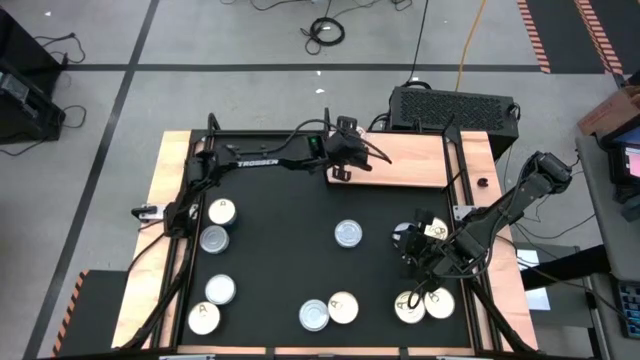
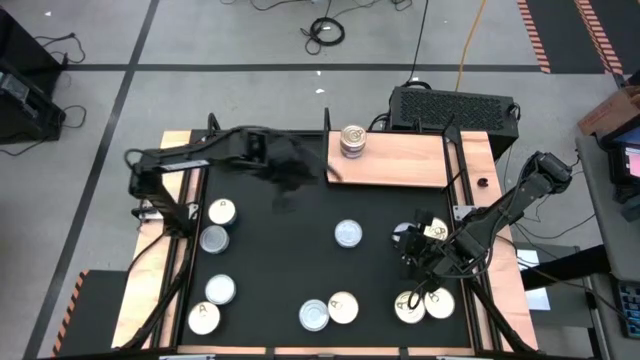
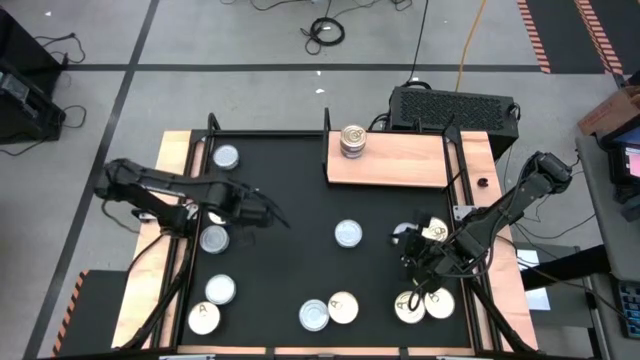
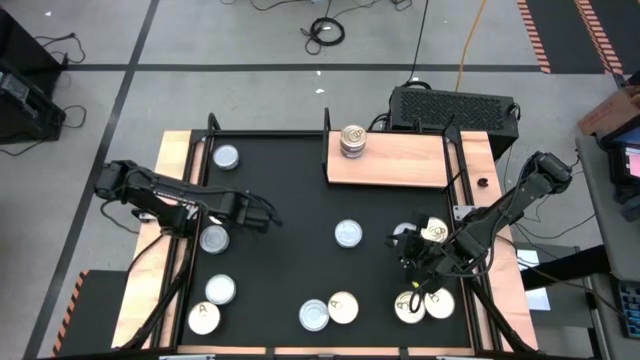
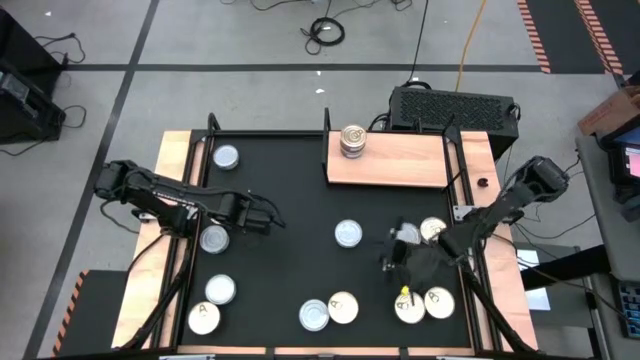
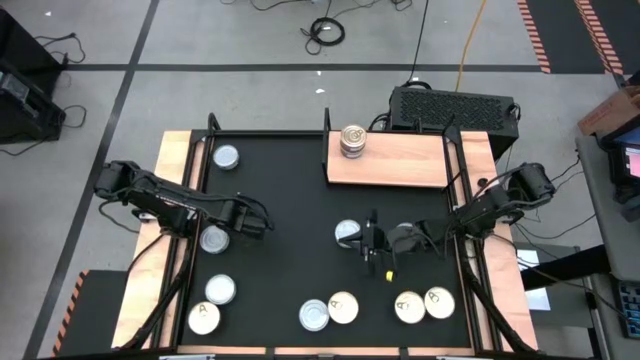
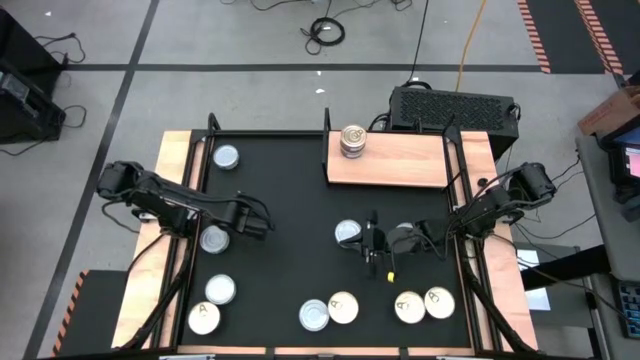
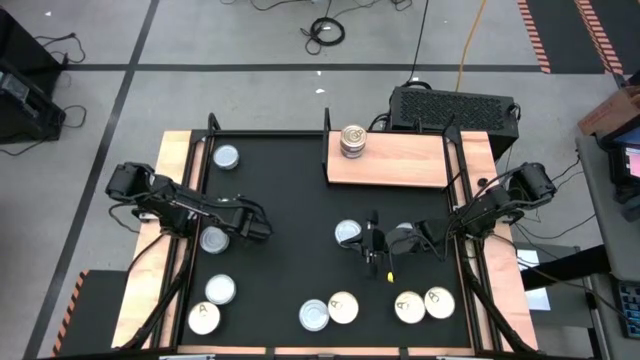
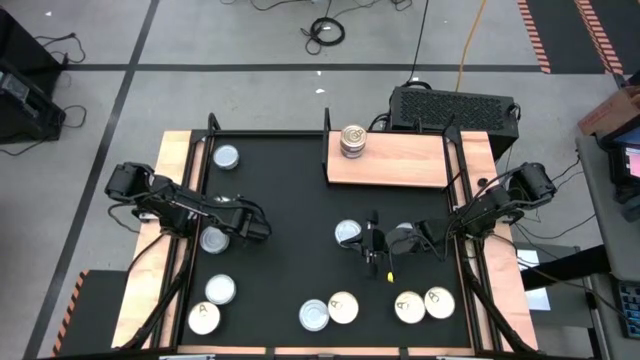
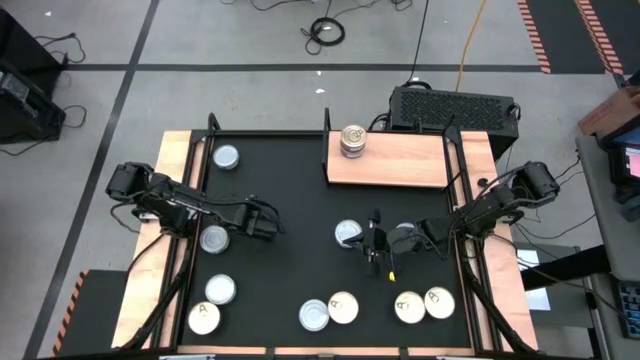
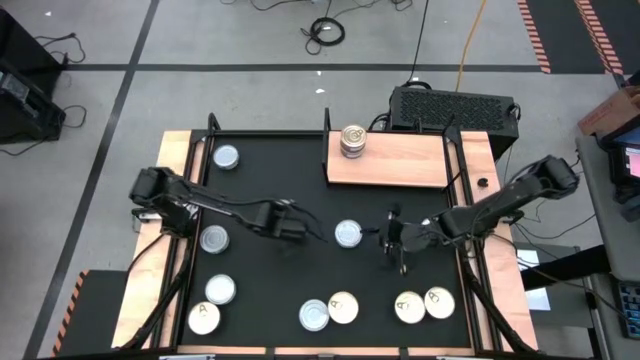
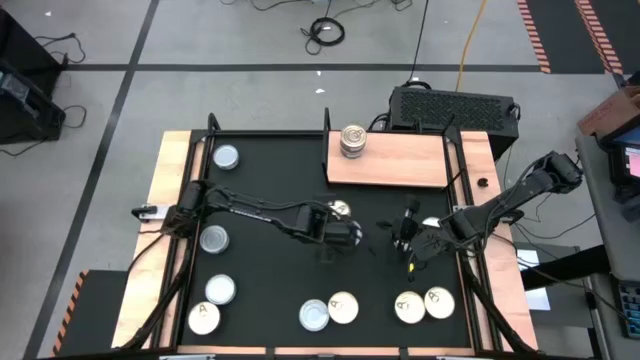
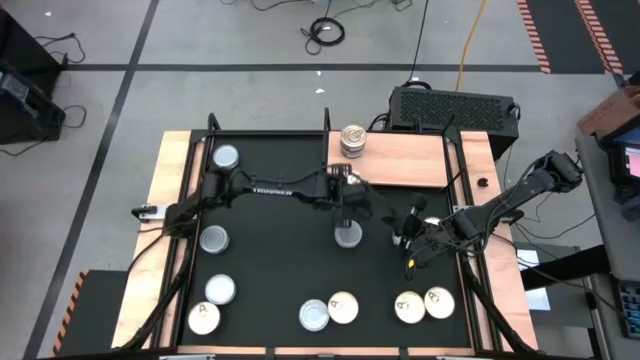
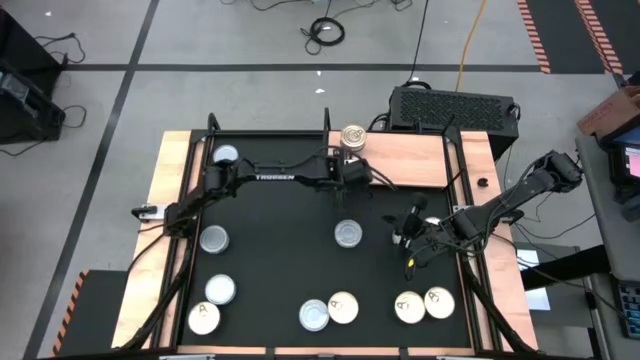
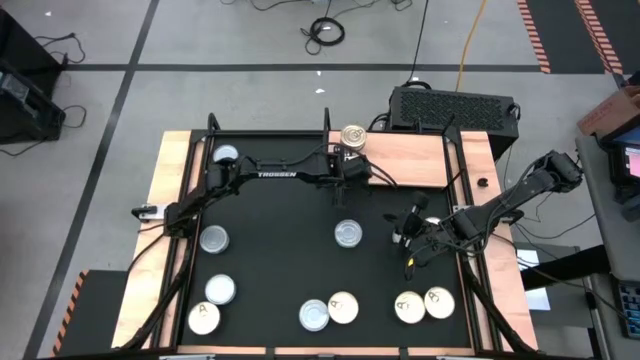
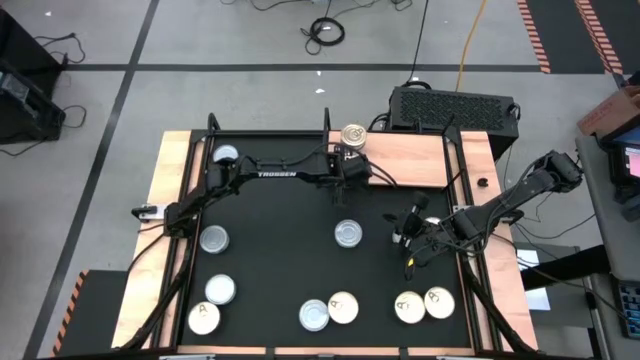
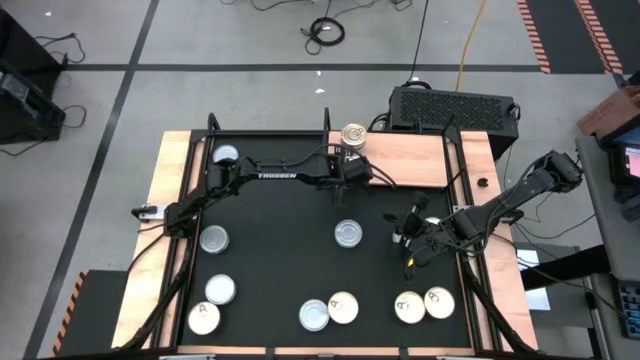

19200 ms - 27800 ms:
Task: Stack canned seafood by type on shelf
Put the blue-pink tuna can aligned with the other blue-pink tuna can on the shelf

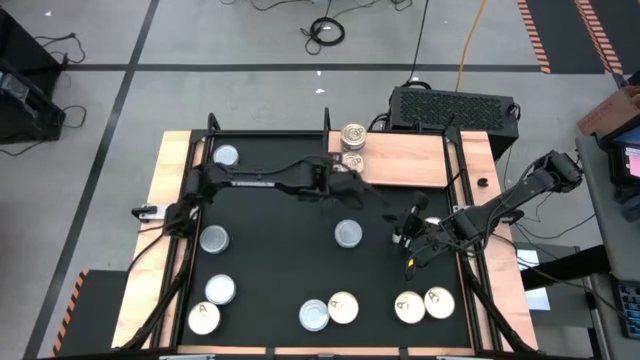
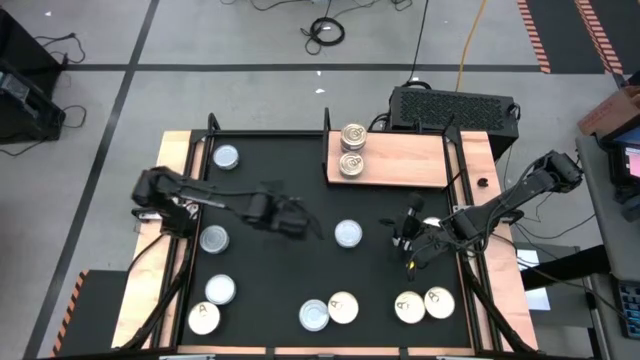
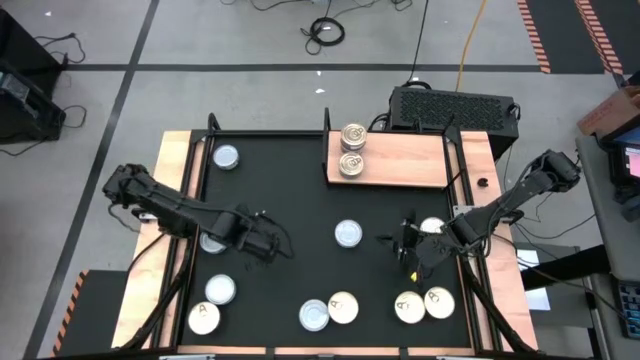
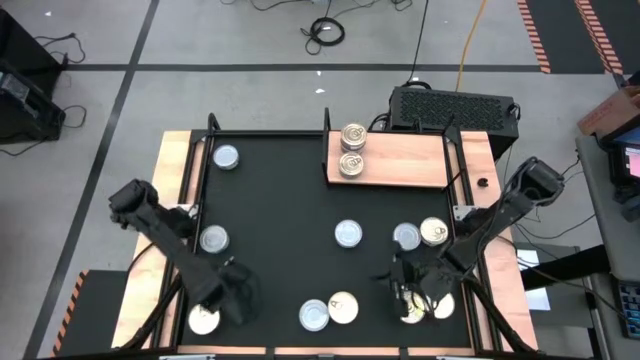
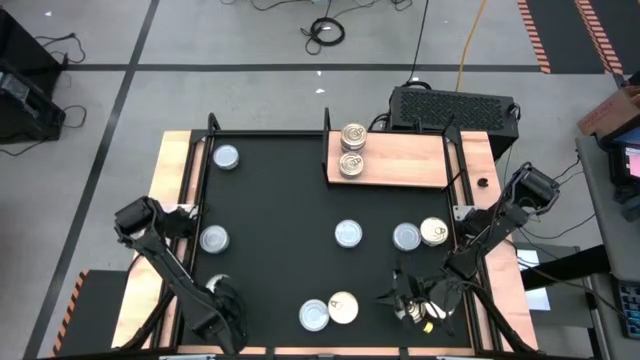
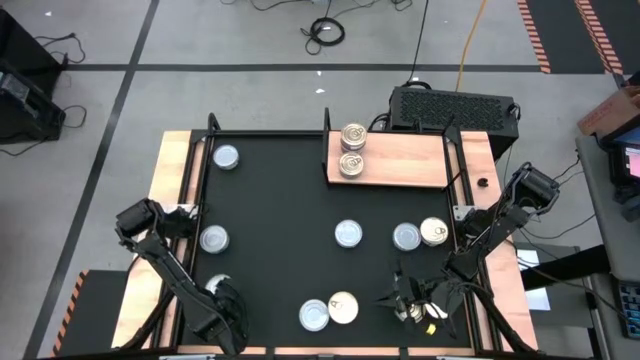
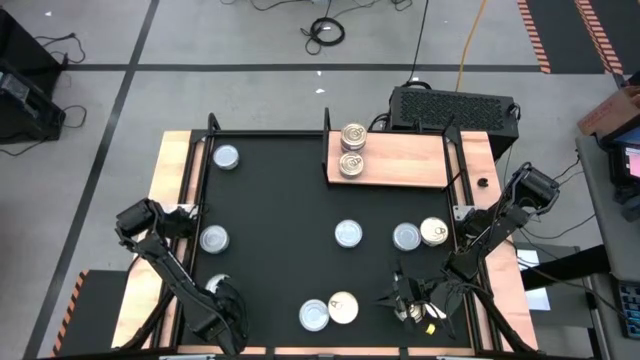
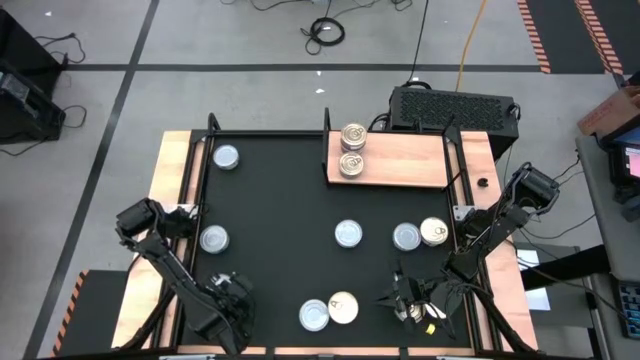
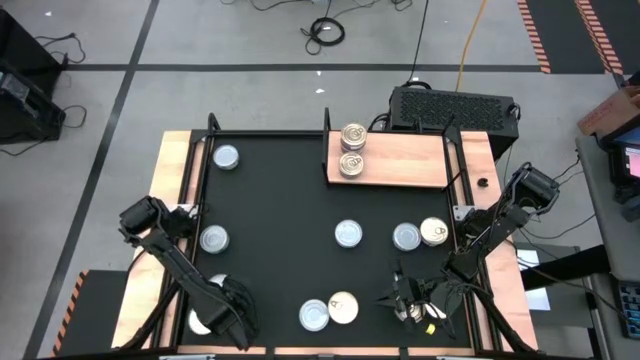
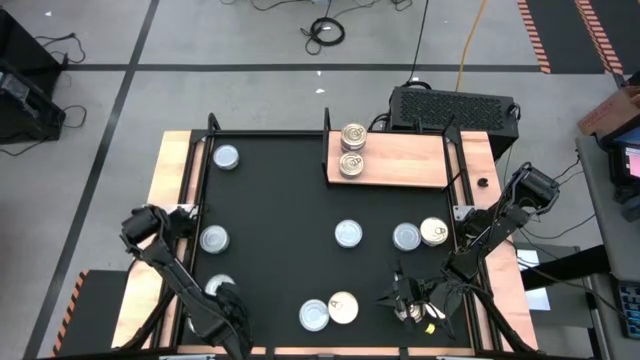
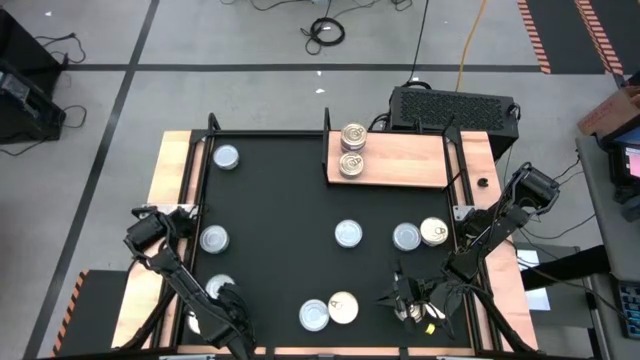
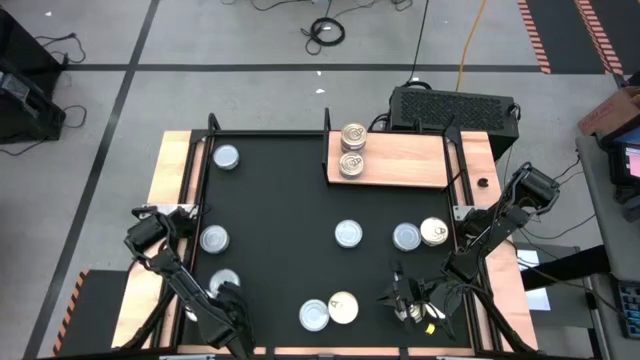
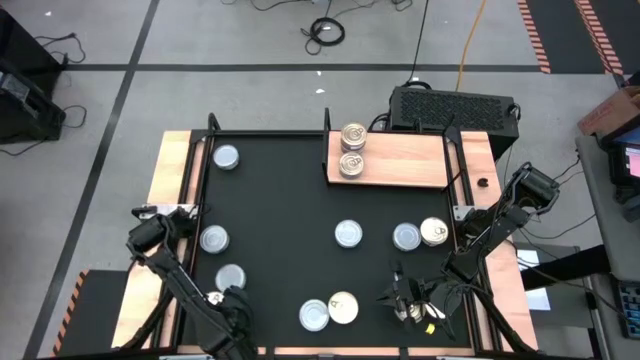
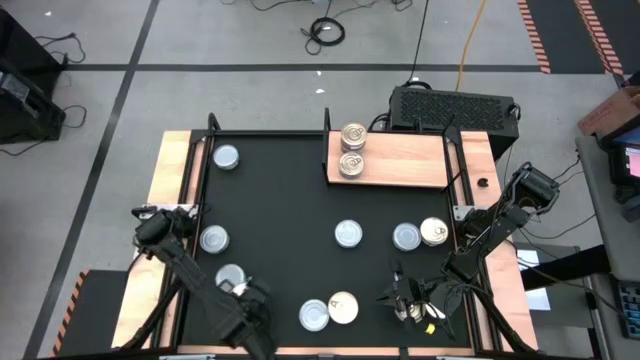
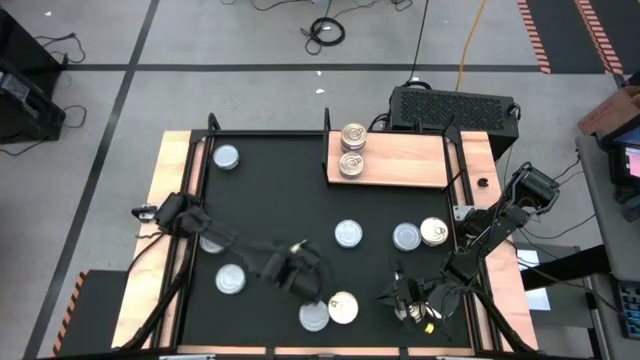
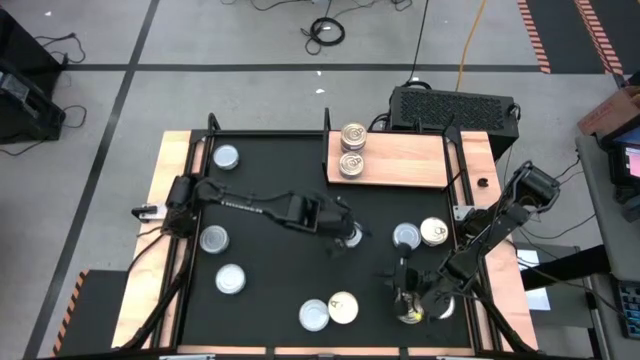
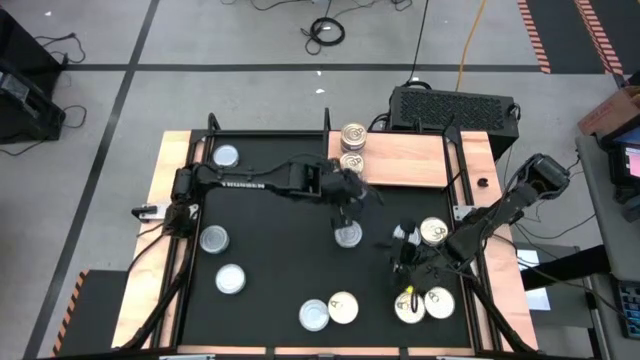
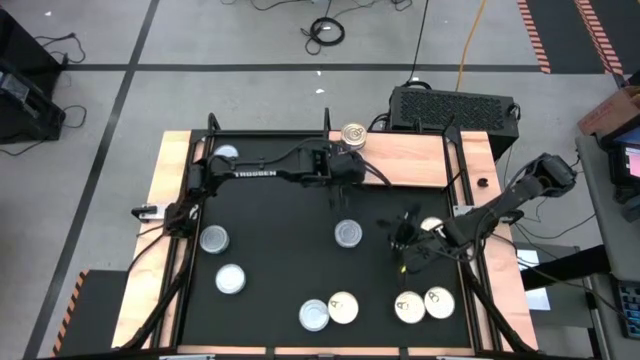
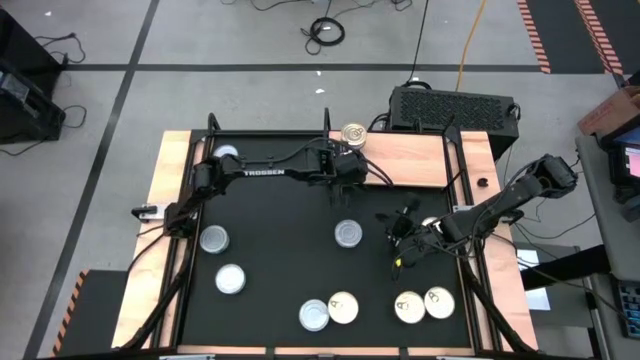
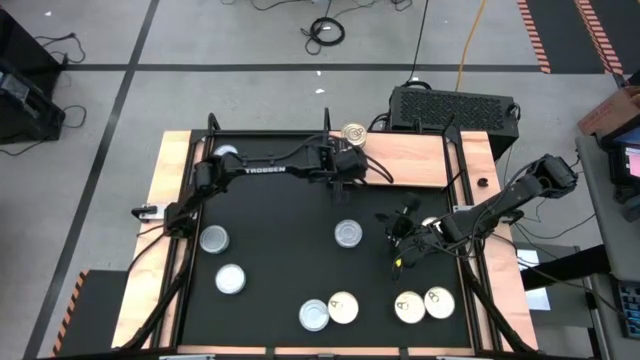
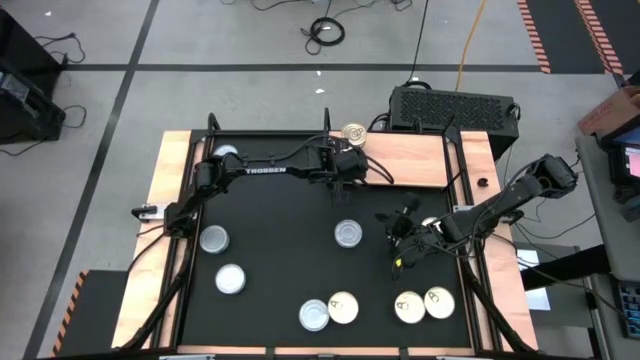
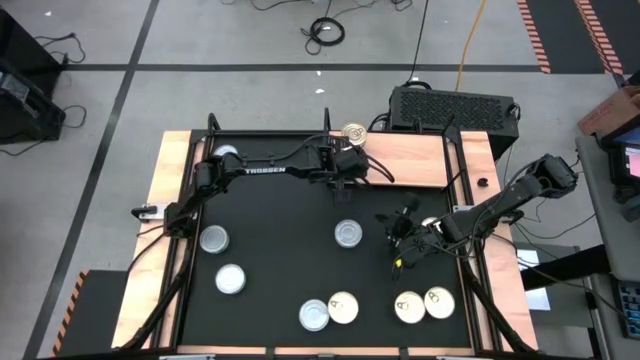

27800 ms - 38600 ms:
Stack the blue-pink tuna can on top of the bottom blue-pink tuna can on the shelf

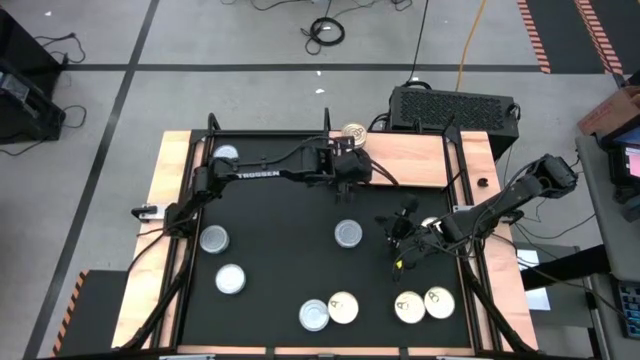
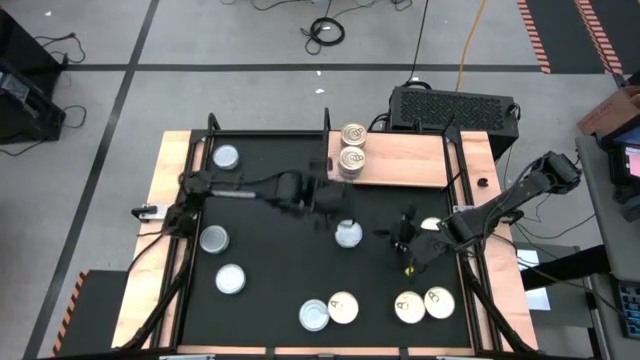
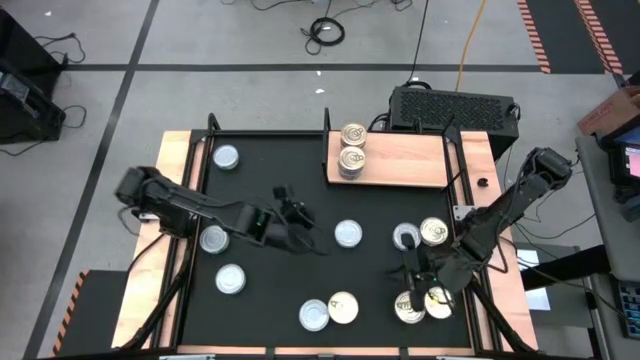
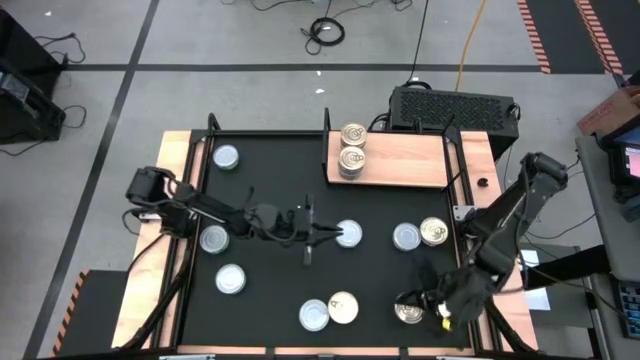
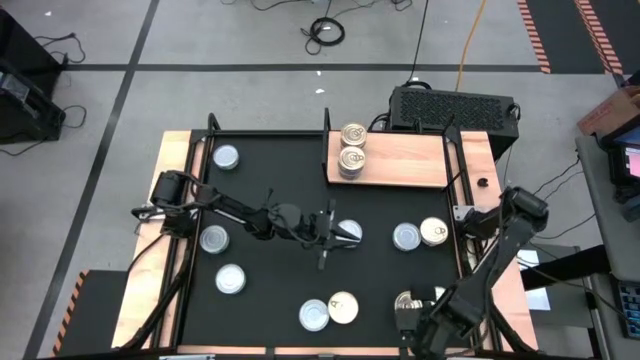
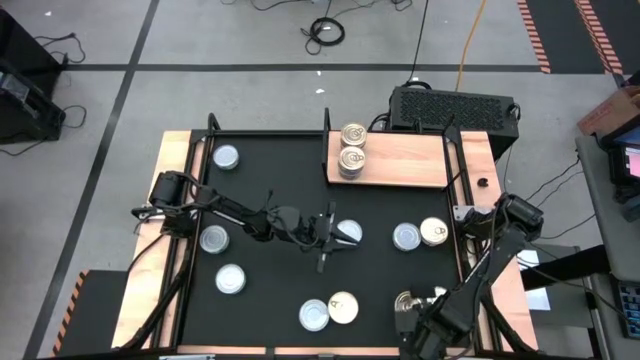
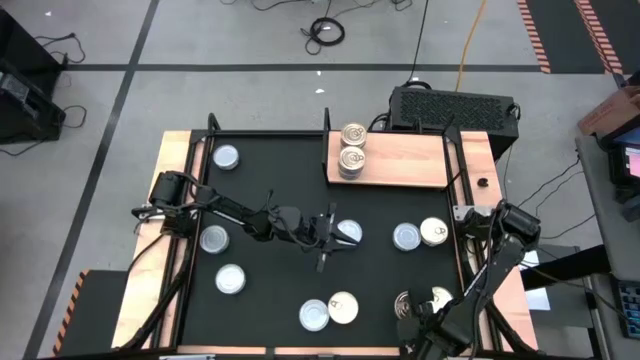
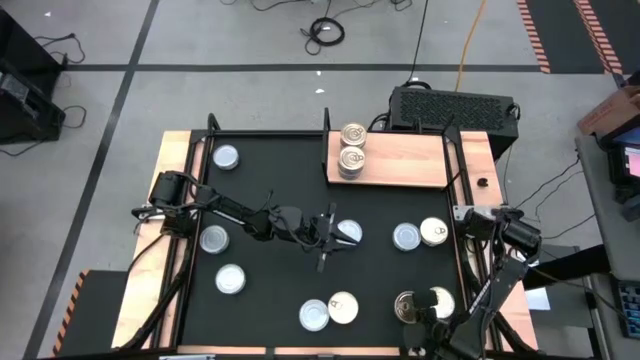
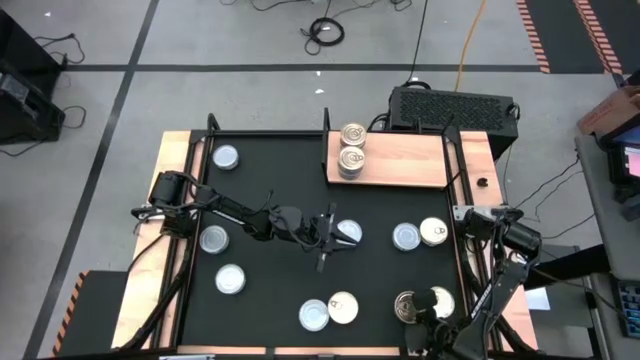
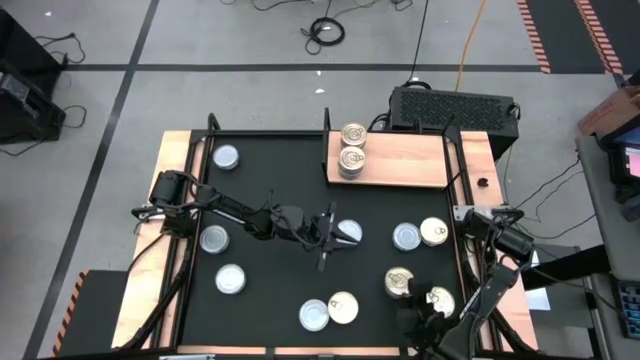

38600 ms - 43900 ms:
Put the blue-pink tuna can on the shelf
